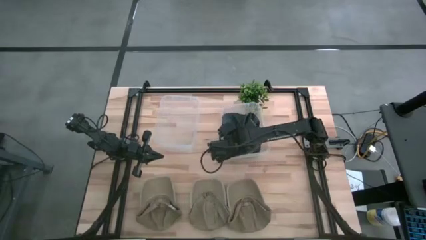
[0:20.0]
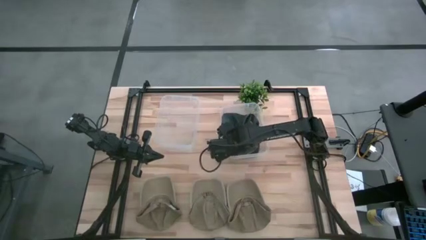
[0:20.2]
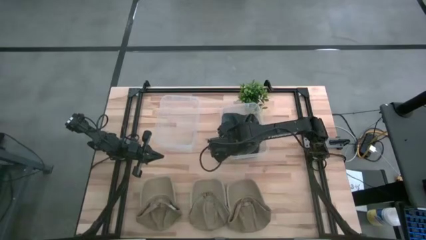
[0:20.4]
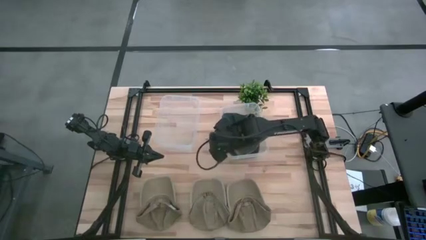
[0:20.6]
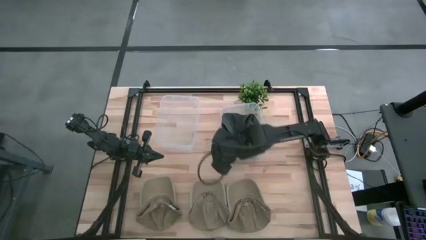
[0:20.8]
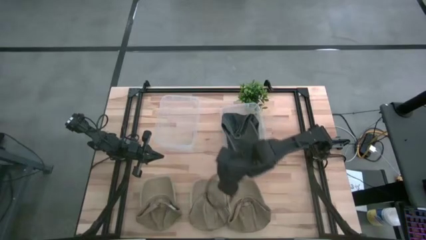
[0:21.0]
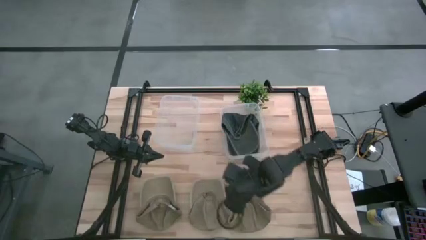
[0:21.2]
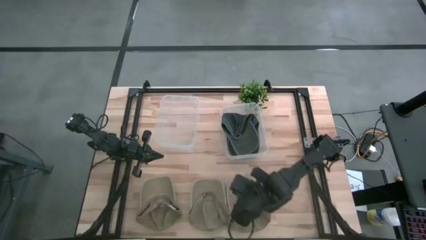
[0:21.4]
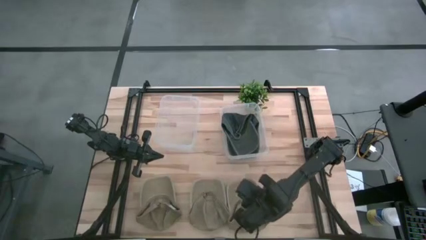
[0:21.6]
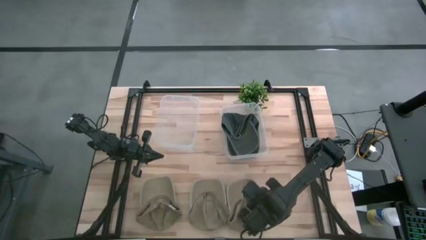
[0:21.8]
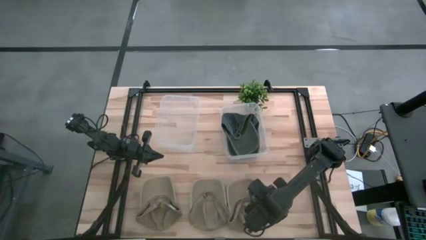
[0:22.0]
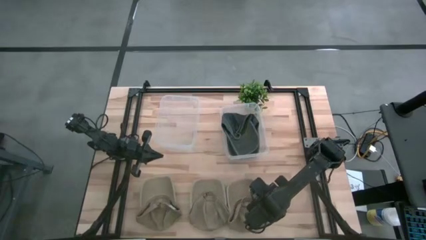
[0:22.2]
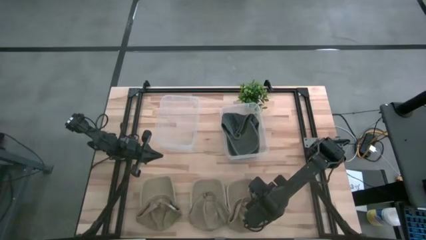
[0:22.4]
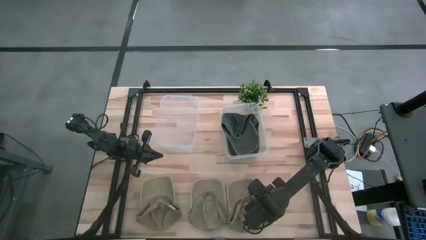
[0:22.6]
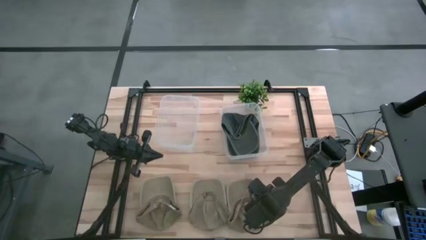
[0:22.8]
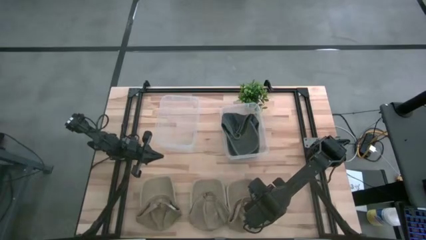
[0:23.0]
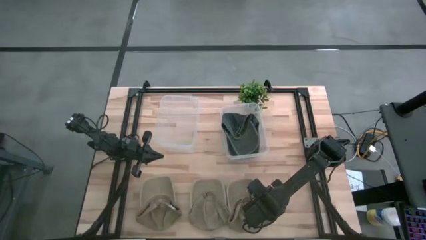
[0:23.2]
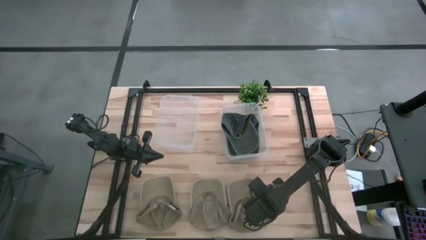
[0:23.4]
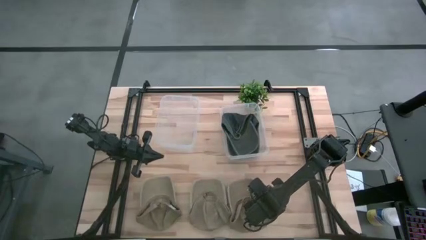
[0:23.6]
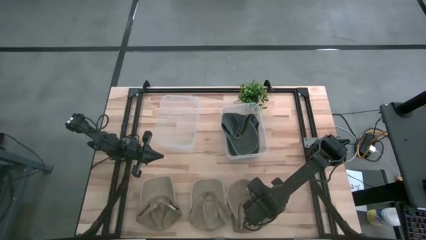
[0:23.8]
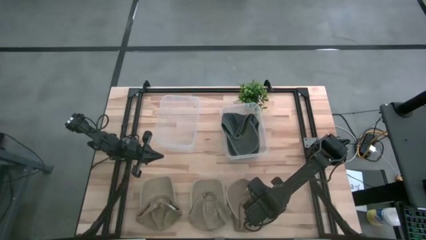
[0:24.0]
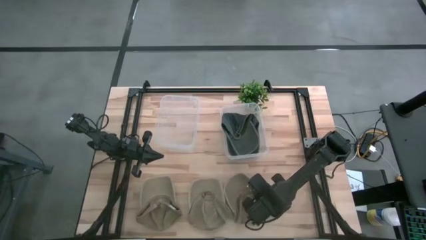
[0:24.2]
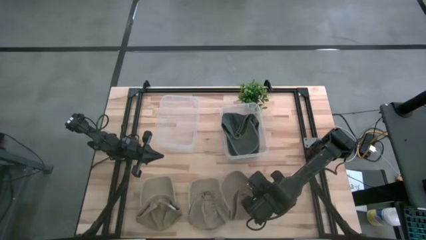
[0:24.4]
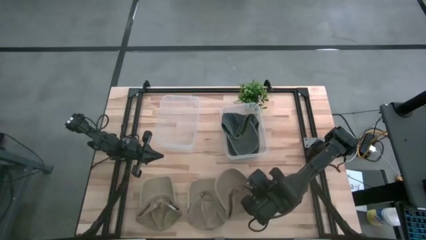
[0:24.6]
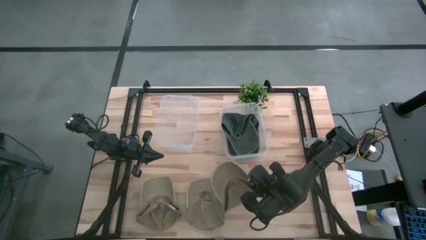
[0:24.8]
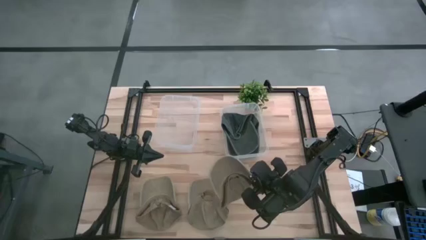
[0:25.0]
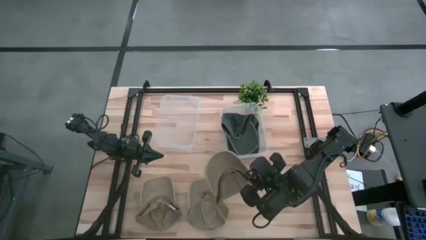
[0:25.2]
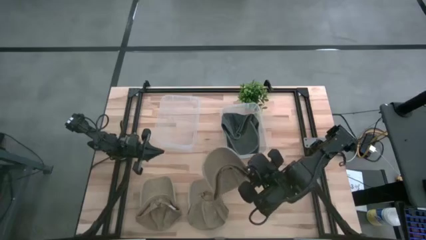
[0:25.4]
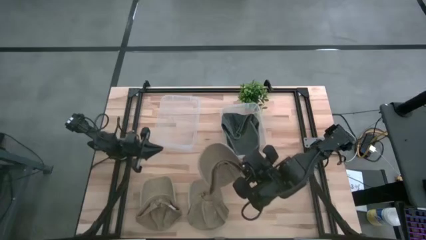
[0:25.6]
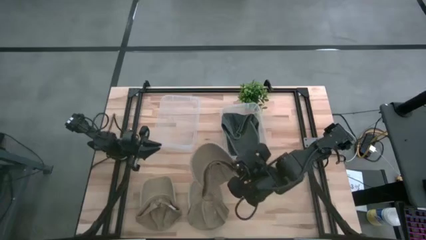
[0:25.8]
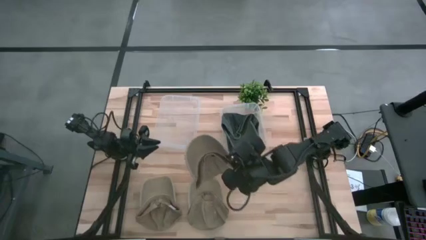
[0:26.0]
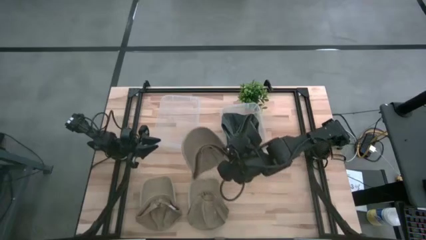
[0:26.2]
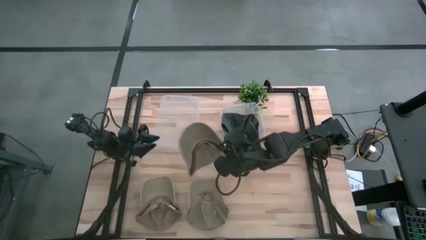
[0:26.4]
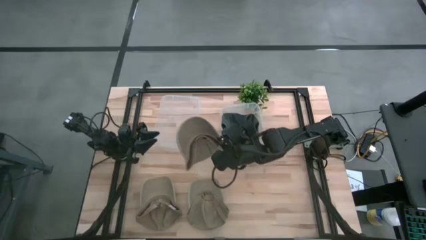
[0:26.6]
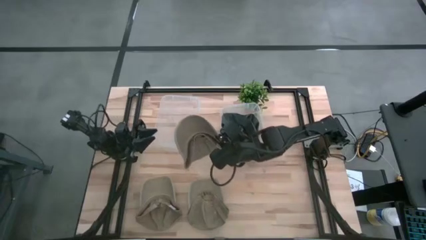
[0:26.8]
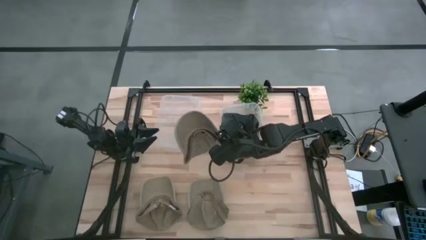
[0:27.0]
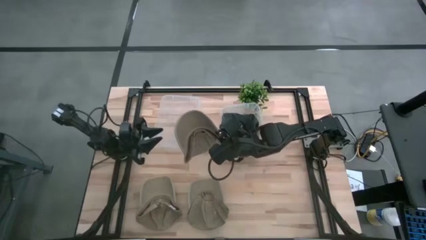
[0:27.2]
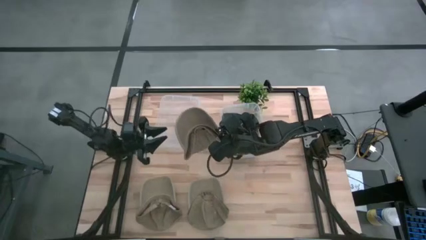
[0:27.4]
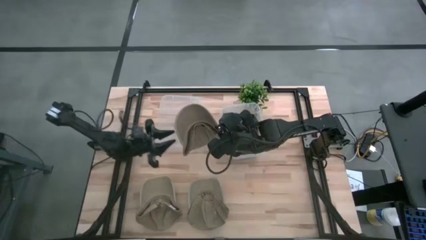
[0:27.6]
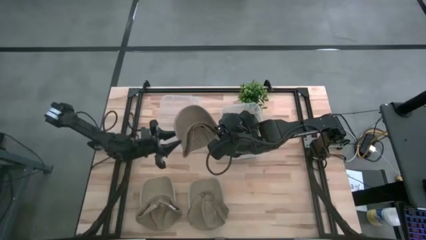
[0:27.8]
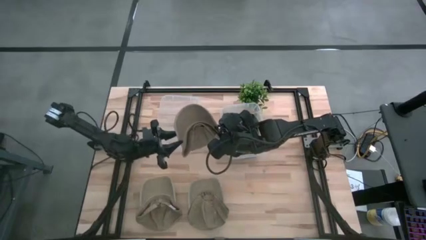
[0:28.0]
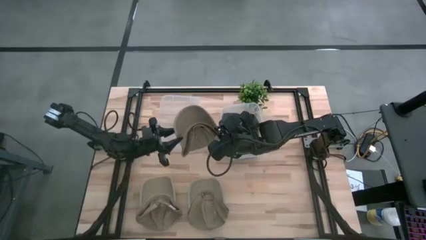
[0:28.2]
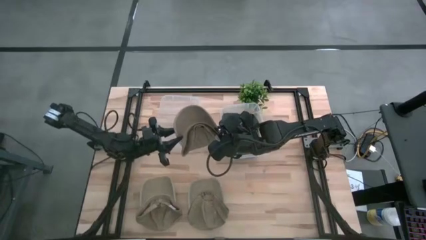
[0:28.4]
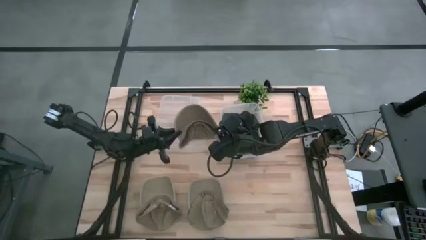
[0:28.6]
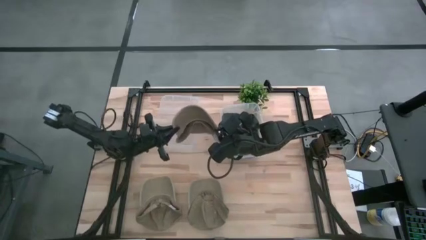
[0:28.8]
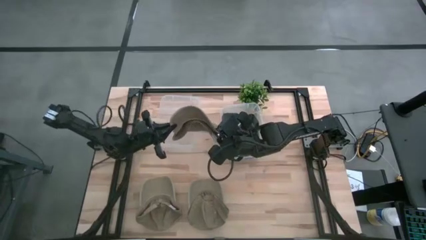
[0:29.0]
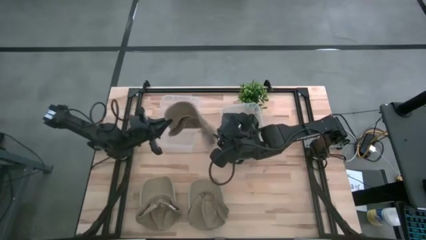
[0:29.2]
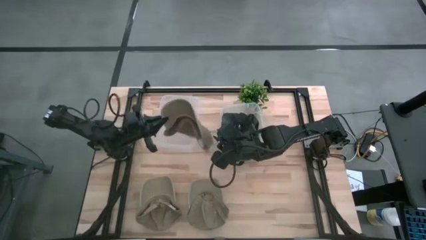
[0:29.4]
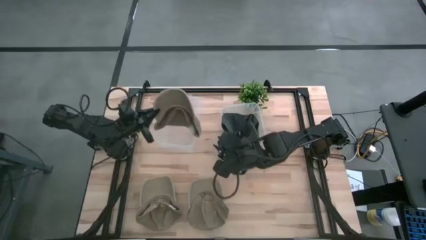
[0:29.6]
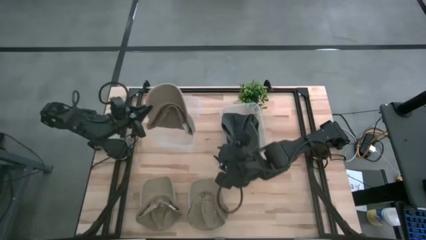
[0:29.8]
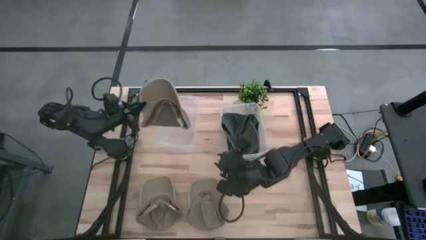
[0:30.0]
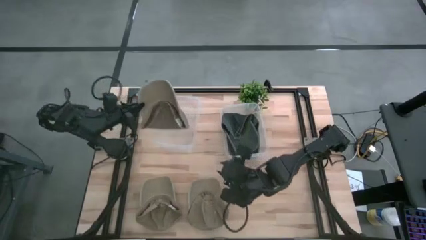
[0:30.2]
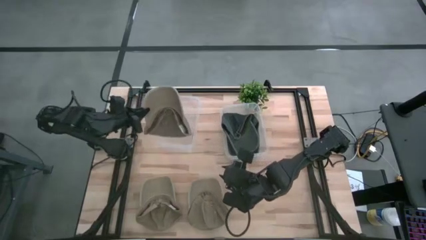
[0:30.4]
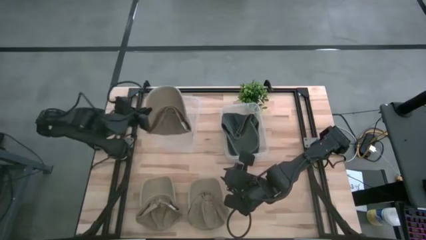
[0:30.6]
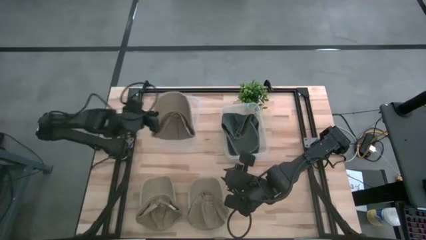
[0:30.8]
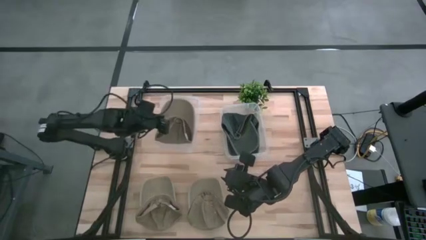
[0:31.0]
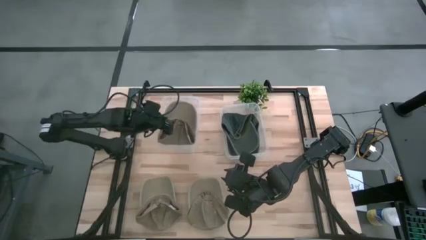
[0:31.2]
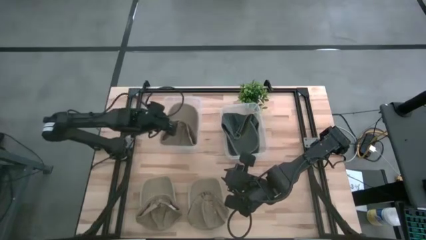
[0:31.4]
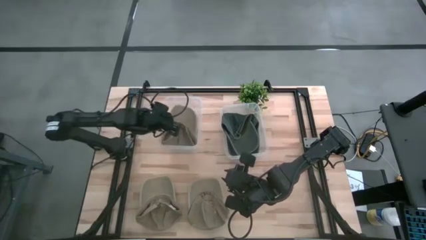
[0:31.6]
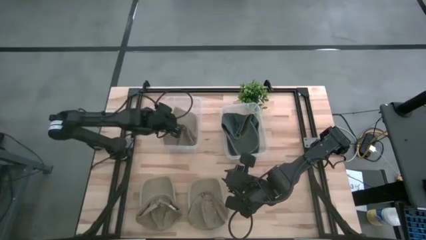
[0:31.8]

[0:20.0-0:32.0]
Task: Pick & Place hat
Put the right brown cap into the left transparent bin

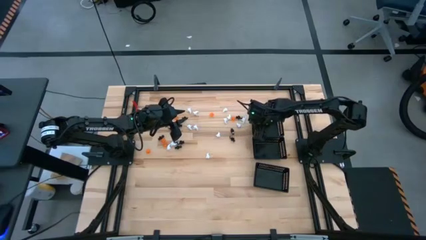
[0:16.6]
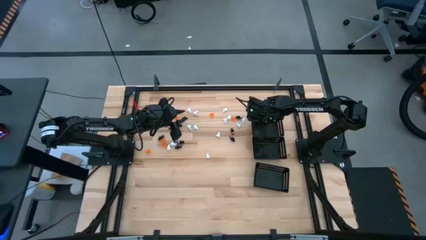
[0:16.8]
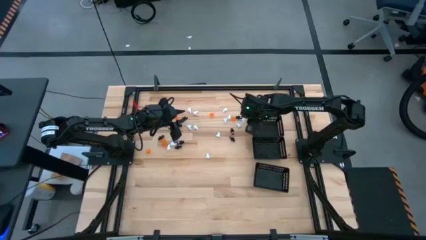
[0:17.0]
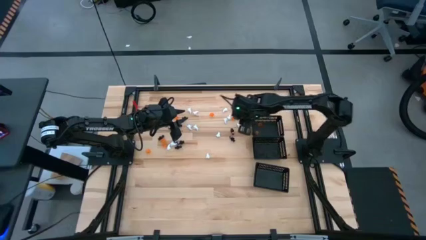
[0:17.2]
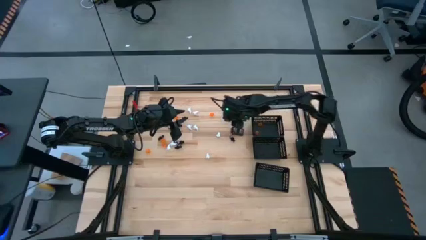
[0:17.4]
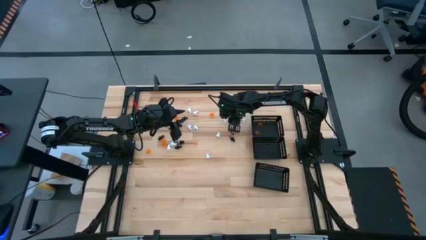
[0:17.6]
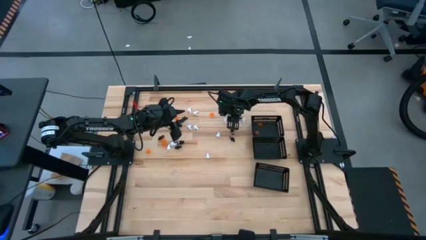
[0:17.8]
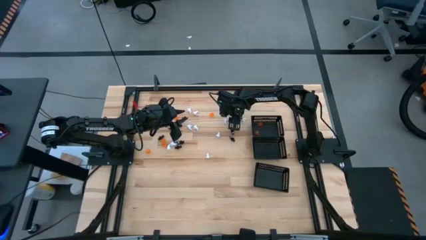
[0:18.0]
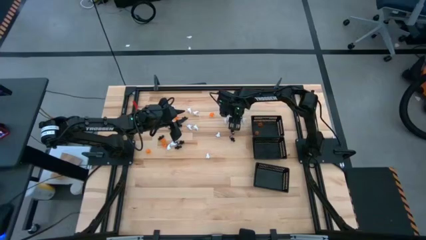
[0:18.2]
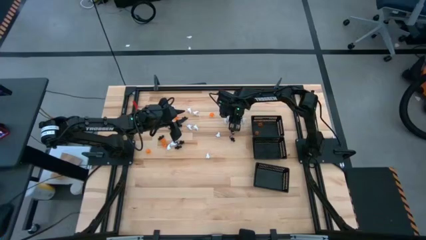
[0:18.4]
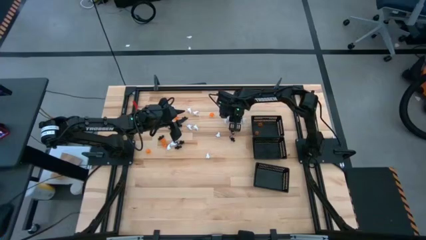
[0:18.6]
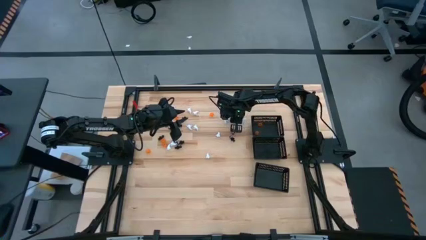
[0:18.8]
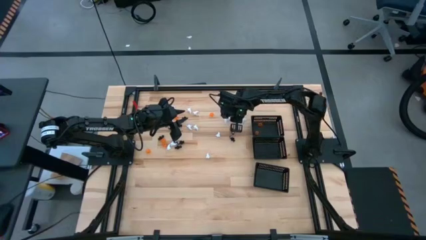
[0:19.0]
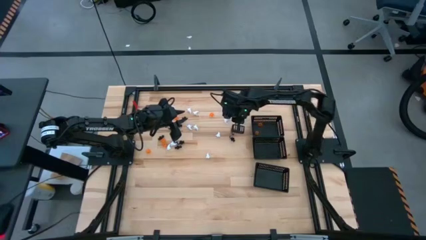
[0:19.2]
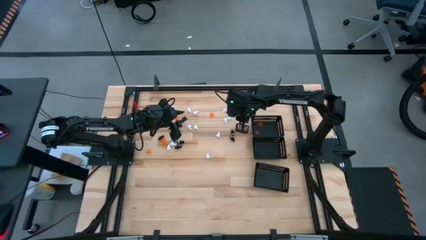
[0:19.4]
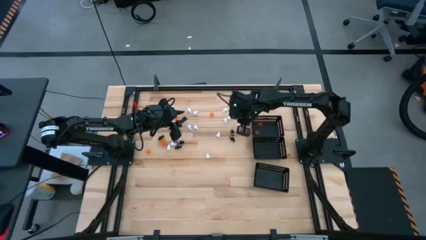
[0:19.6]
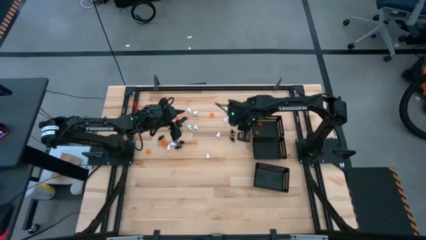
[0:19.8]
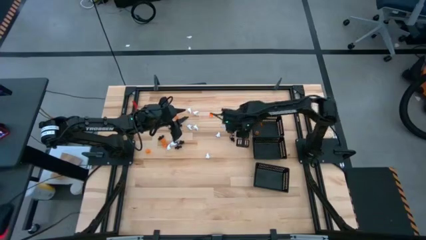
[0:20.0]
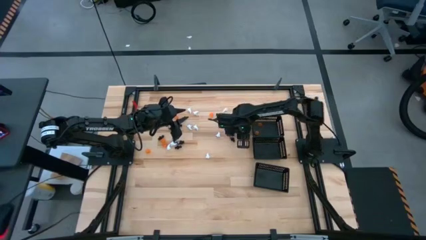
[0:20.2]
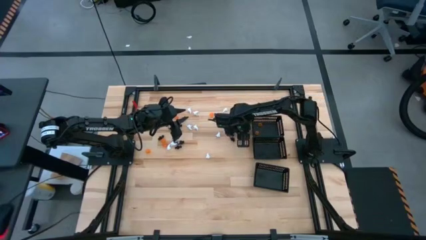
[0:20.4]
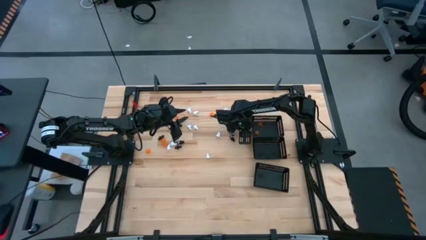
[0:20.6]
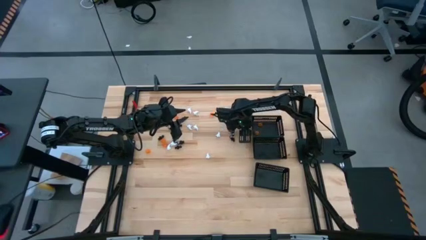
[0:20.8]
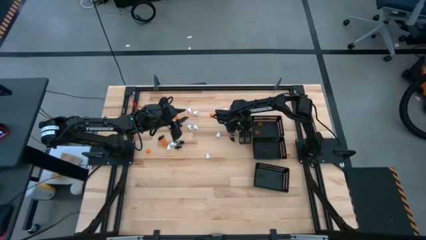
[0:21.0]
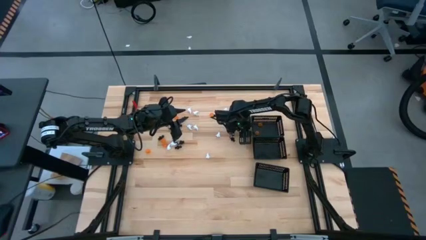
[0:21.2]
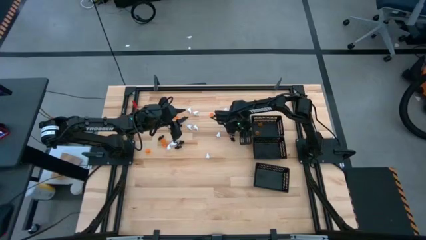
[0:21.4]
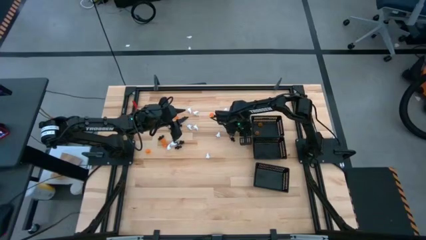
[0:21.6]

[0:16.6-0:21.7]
Task: Sort Halloween decoration
Put the orange pumpkin toy into the top black bin
